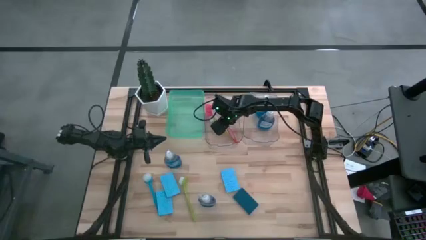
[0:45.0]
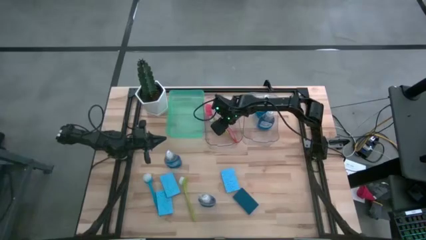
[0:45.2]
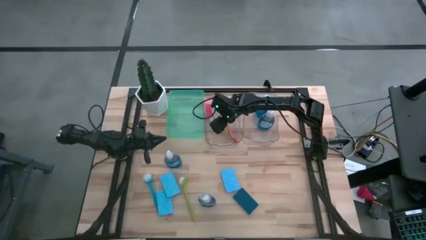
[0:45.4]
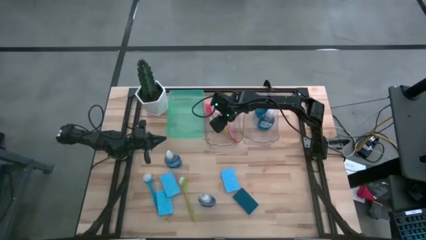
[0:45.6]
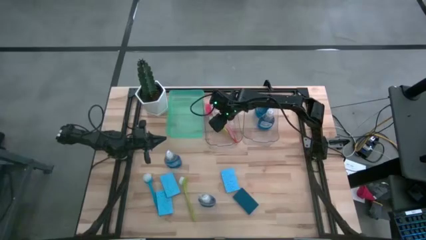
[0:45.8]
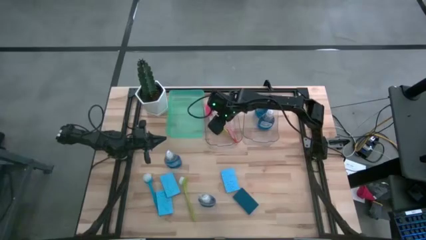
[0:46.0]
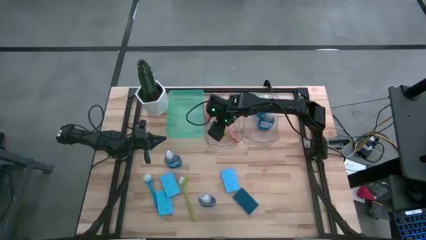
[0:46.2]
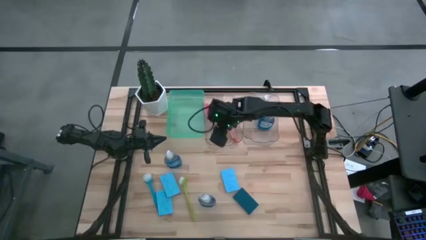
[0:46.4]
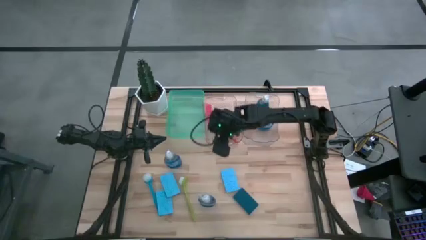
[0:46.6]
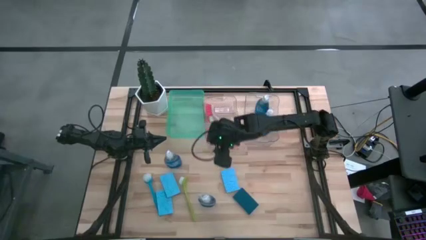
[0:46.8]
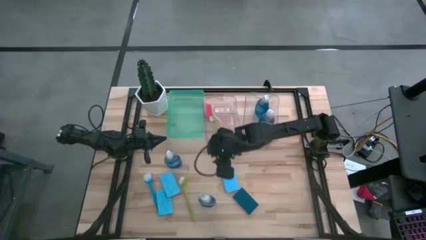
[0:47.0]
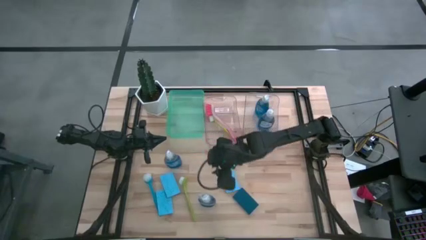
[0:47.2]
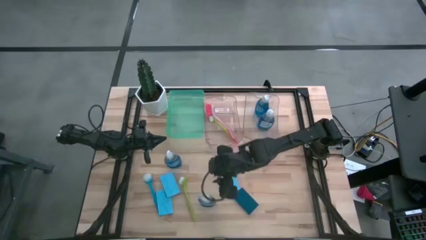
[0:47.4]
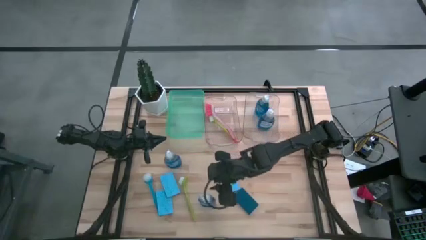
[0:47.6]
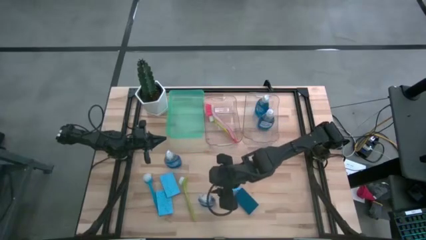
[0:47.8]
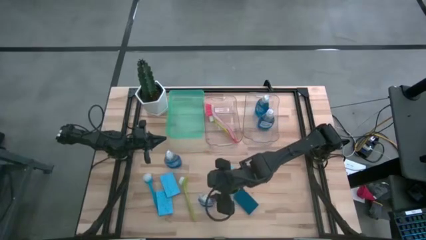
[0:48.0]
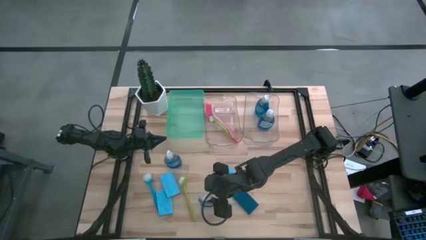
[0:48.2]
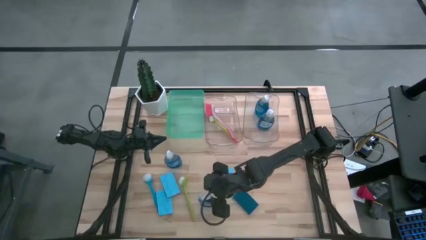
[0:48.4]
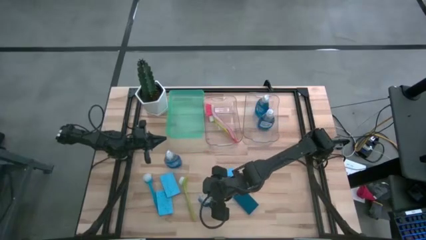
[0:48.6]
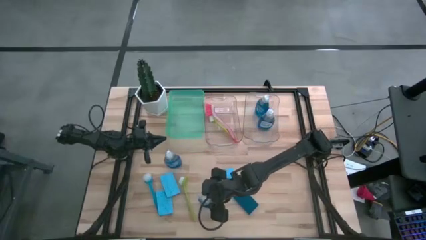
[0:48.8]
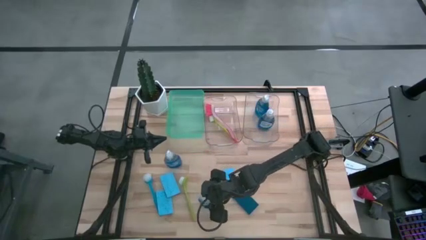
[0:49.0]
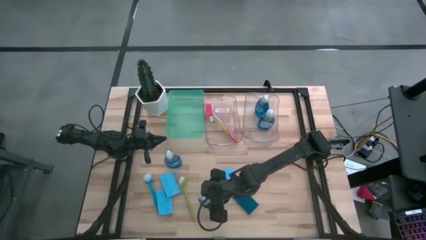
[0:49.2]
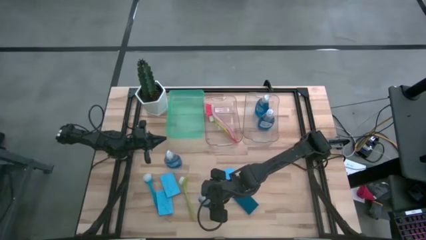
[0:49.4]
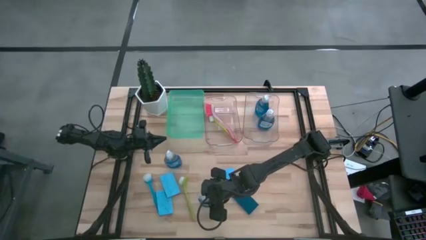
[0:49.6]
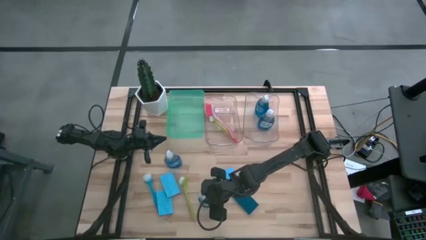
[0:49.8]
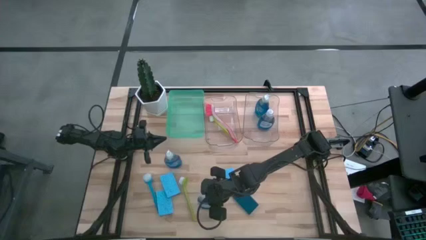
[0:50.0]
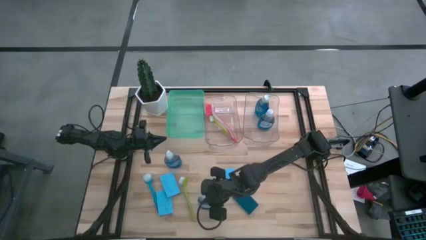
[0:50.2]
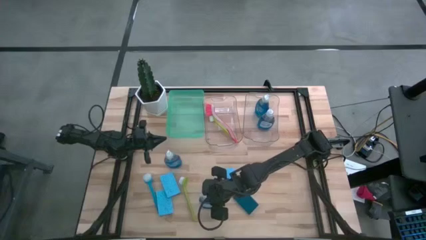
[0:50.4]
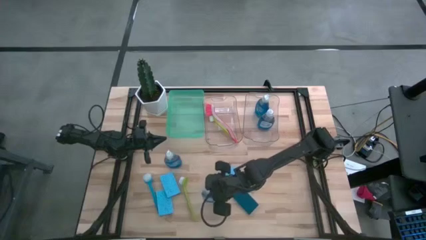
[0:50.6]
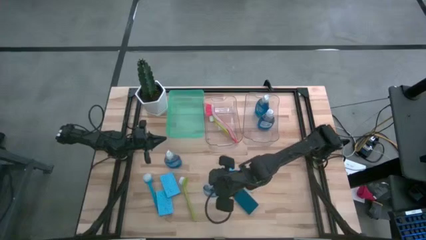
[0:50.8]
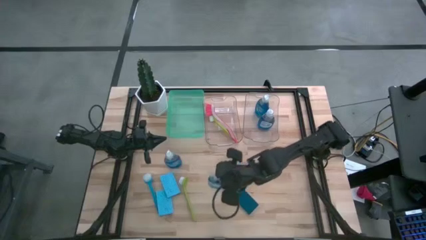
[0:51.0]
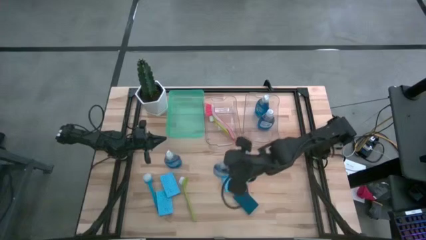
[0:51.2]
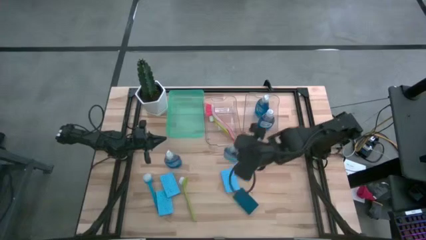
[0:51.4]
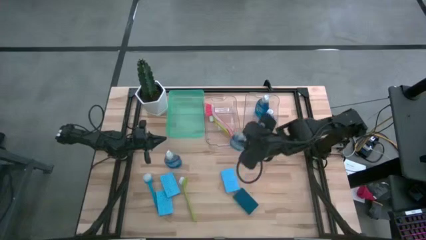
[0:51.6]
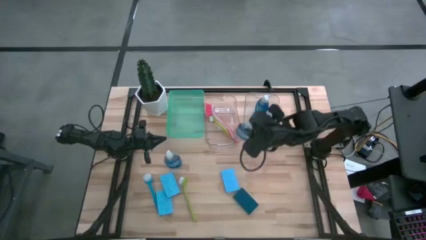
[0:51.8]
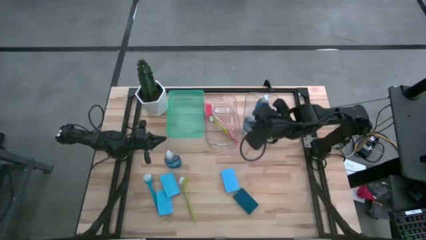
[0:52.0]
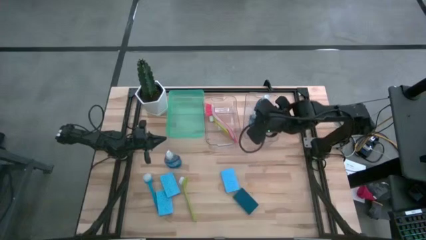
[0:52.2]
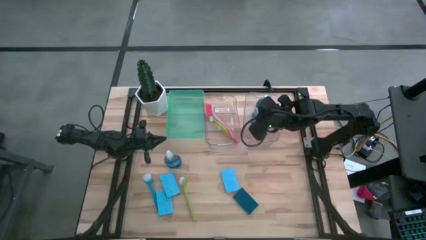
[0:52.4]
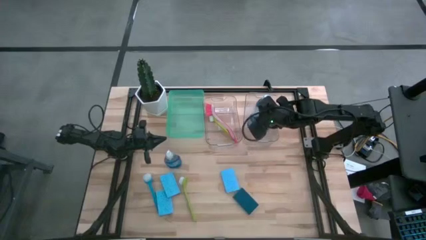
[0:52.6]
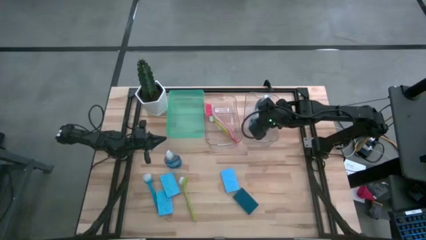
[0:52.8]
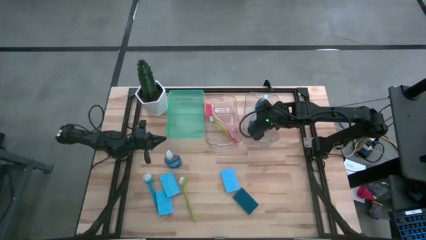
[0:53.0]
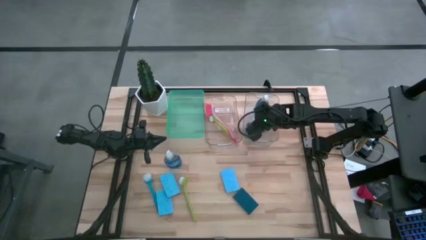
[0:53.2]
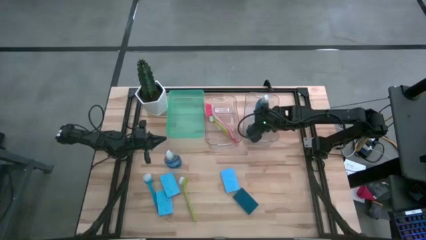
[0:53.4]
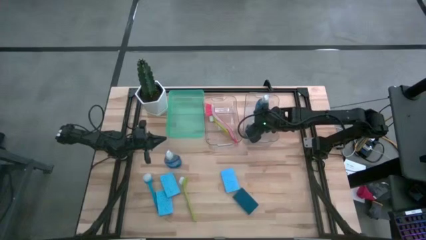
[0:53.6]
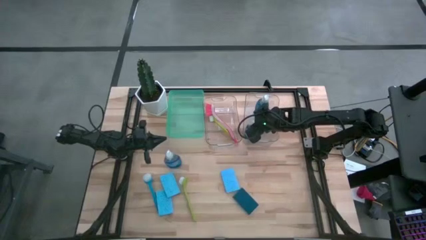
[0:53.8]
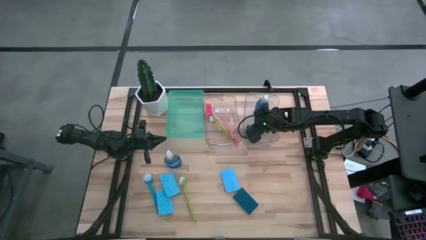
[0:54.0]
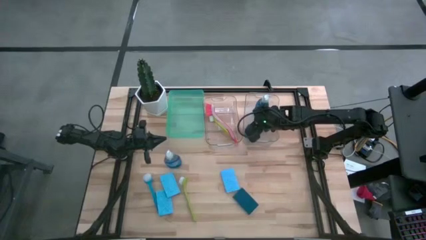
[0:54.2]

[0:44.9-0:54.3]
Task: Pick & Place Kitchen Sink Supplies
Put the blue dishwashing liquid bottle into the right transparent bin

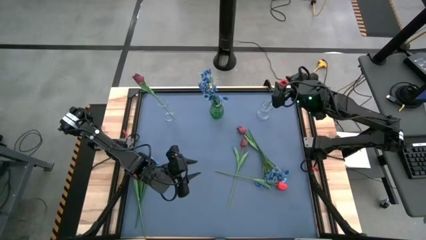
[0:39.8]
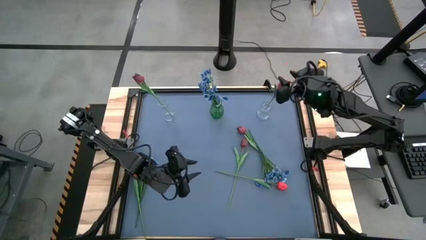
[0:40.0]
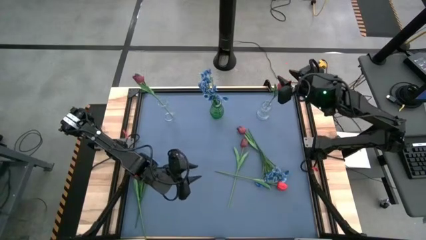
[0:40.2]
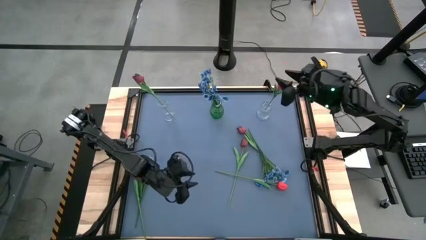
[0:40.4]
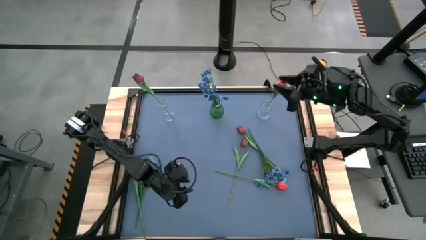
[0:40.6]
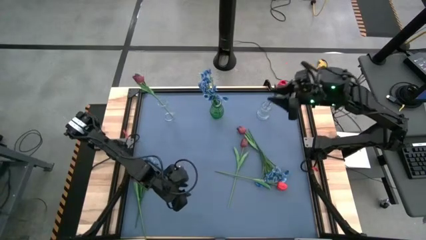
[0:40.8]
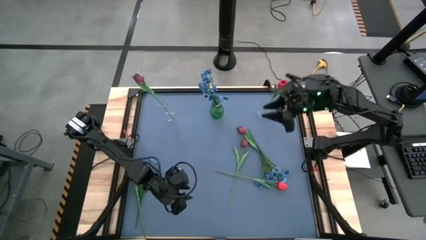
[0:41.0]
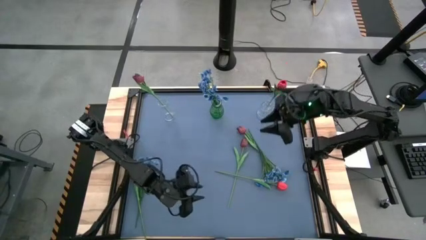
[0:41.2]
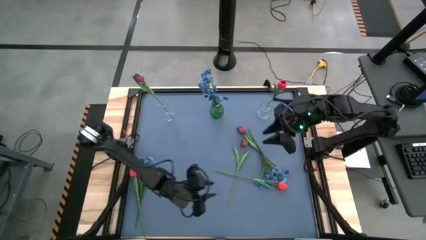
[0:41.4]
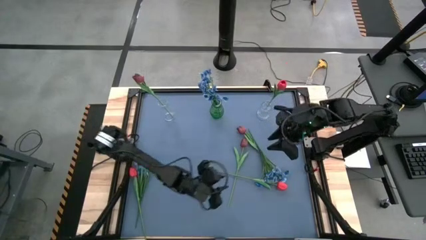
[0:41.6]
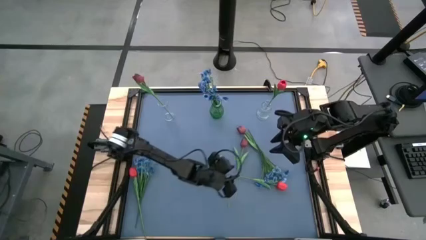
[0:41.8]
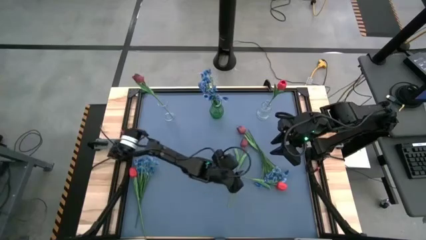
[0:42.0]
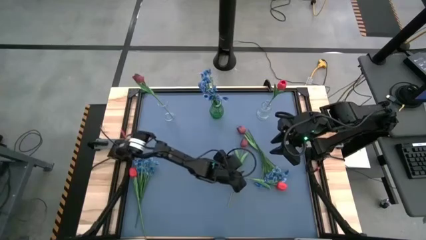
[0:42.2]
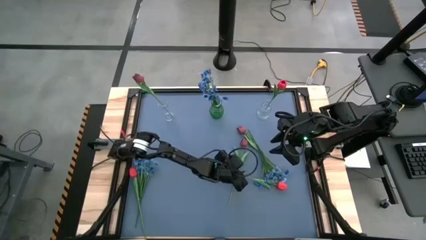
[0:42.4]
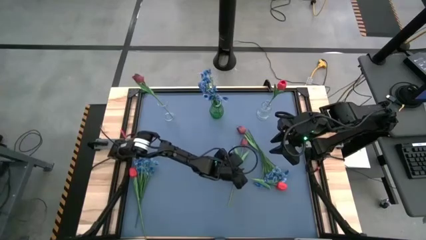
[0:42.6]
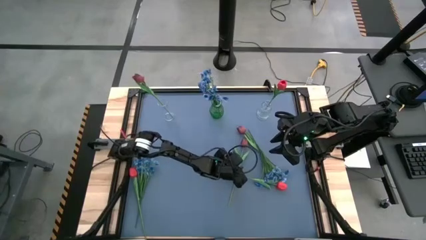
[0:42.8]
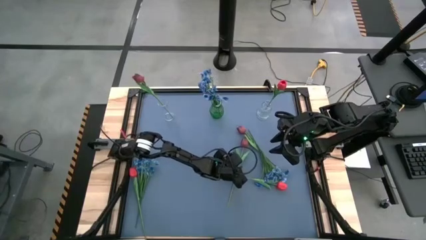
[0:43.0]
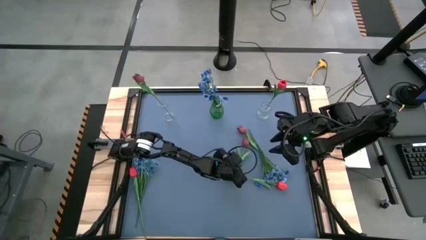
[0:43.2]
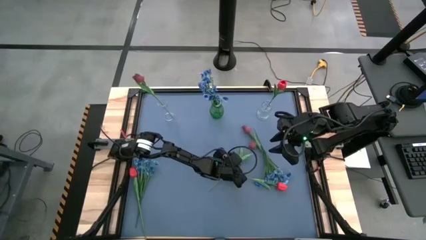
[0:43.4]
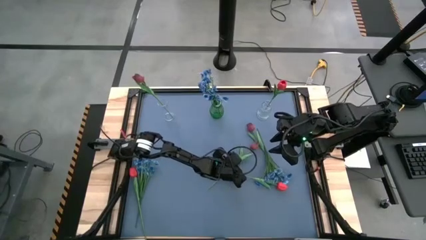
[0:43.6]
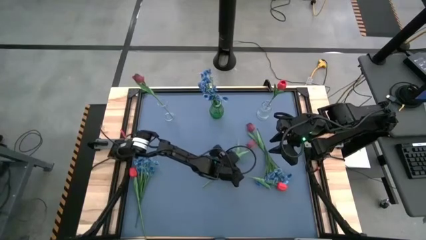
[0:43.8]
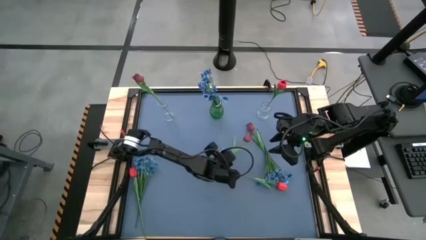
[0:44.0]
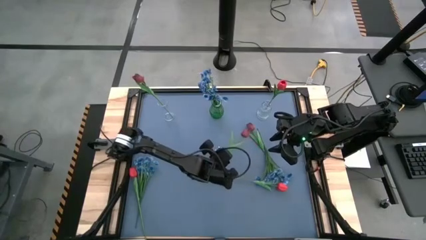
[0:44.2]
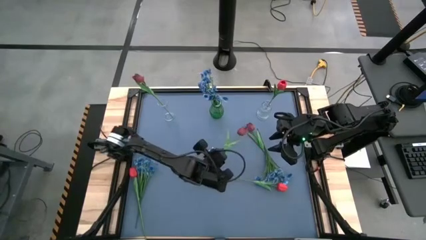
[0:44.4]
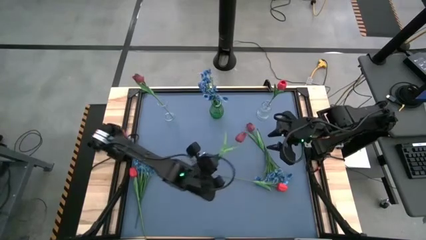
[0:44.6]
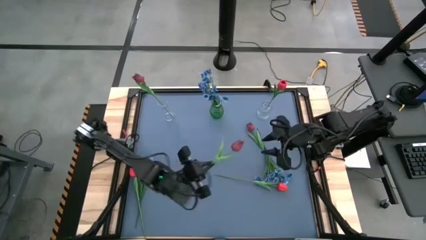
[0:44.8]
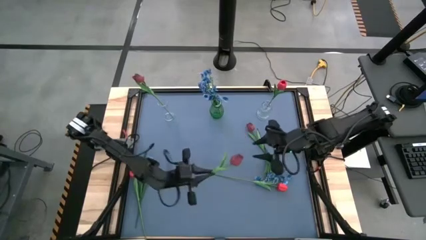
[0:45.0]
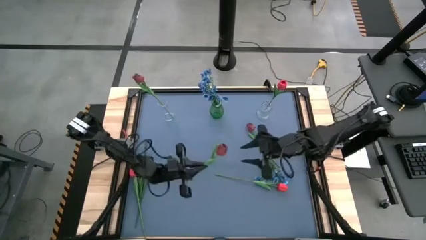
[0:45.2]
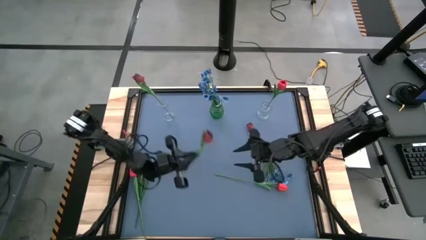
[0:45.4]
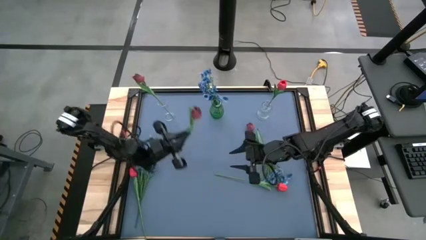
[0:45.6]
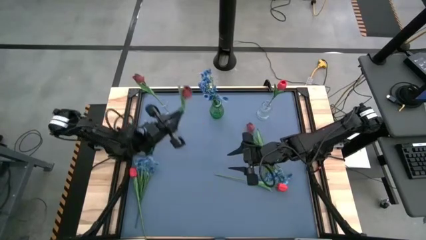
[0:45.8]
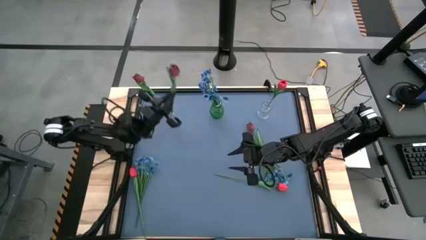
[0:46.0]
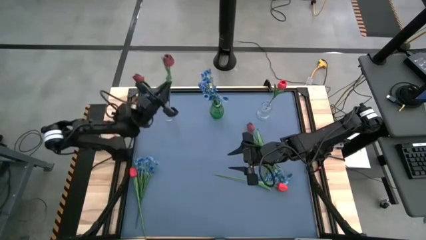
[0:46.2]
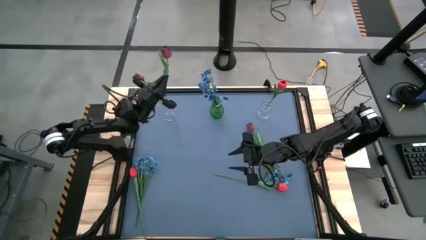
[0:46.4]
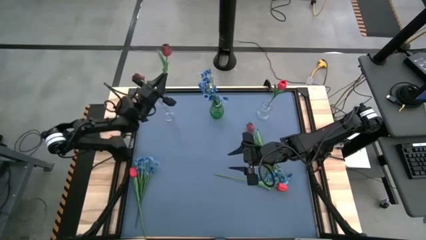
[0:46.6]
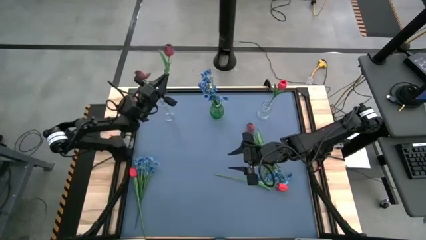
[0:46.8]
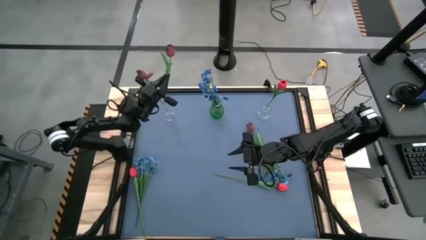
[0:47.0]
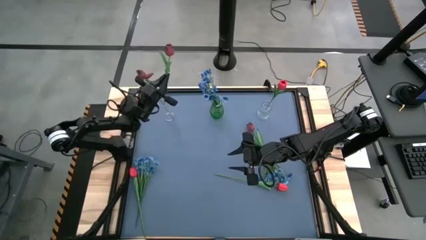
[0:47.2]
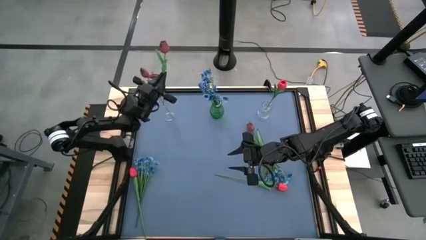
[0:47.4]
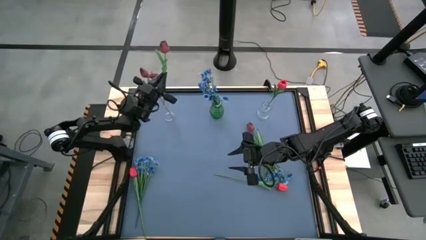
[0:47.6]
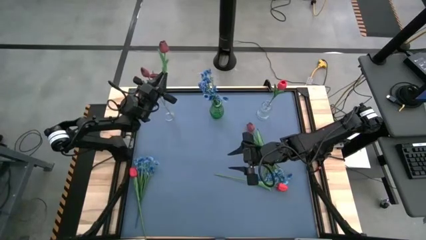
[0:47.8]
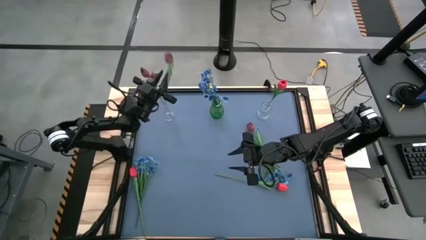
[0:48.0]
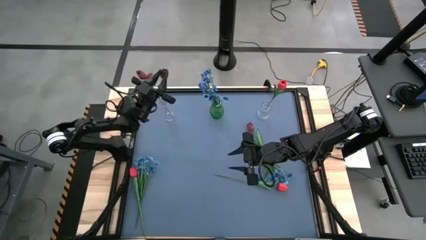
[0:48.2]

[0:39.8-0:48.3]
Task: Sort flowers into vase by color
Put the left red flower into the left transparent vase
